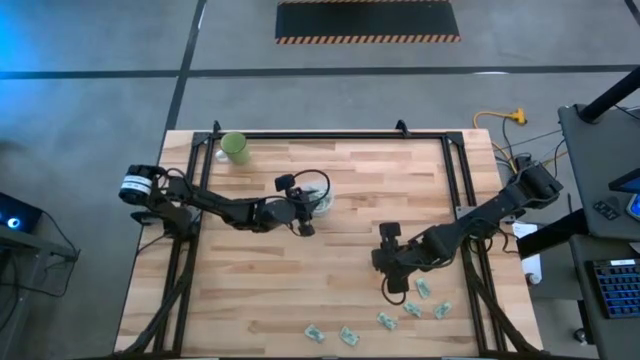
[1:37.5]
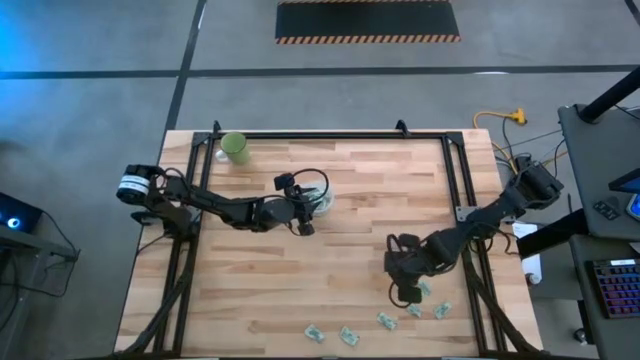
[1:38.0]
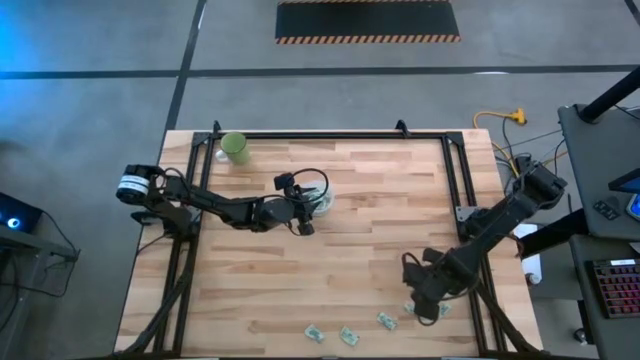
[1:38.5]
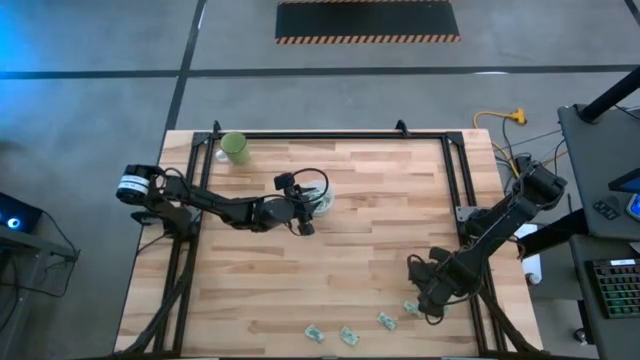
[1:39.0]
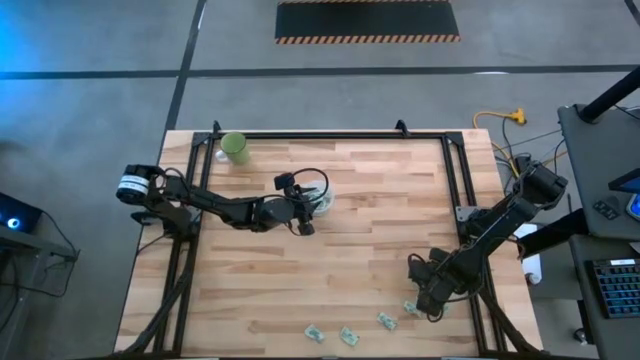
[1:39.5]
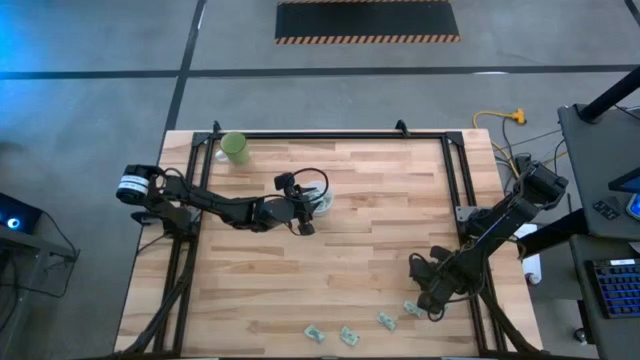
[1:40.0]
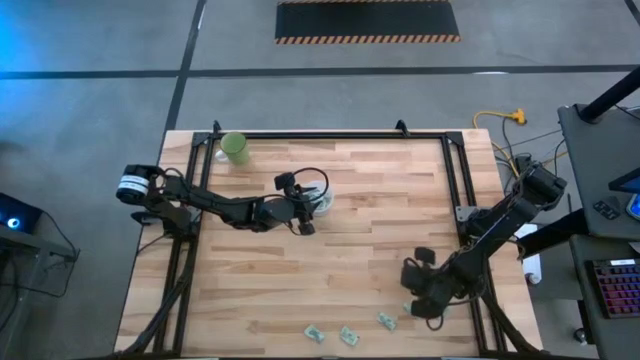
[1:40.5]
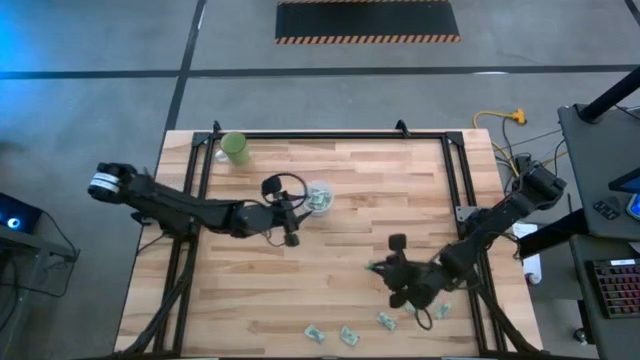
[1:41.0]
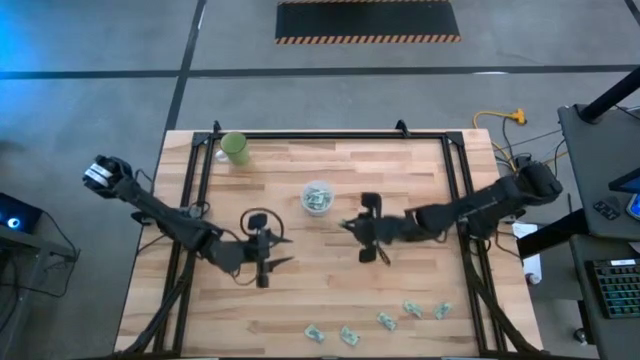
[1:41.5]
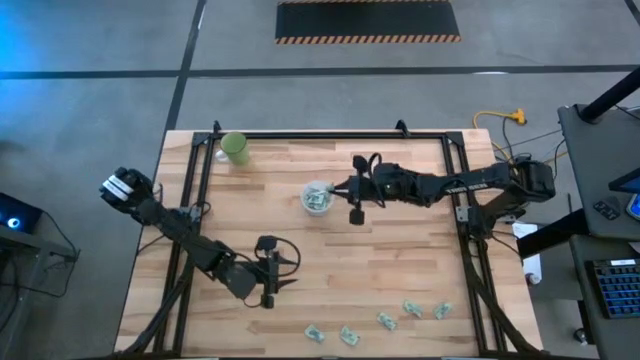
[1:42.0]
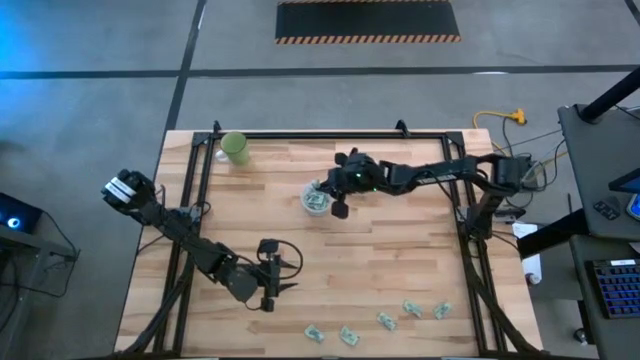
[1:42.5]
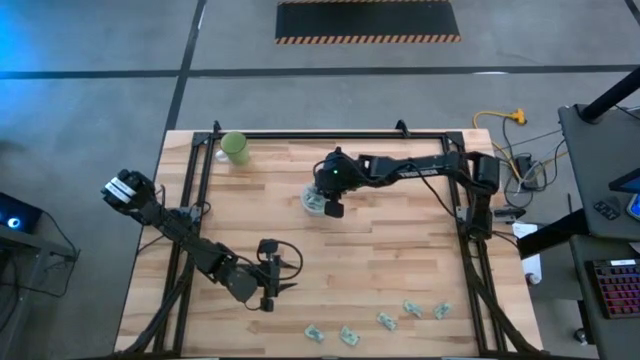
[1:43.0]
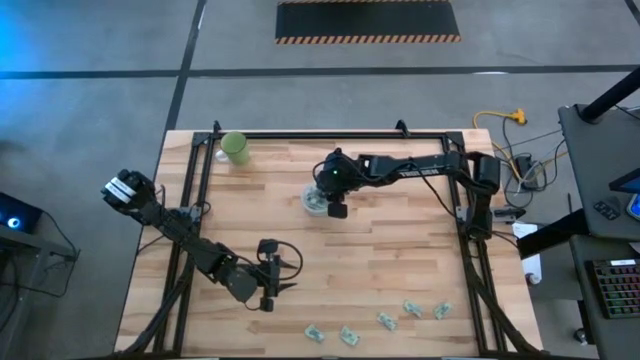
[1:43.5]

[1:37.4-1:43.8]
Task: Pick and place Stevia / Truvia into bins
Put the green stevia packet into the transparent container

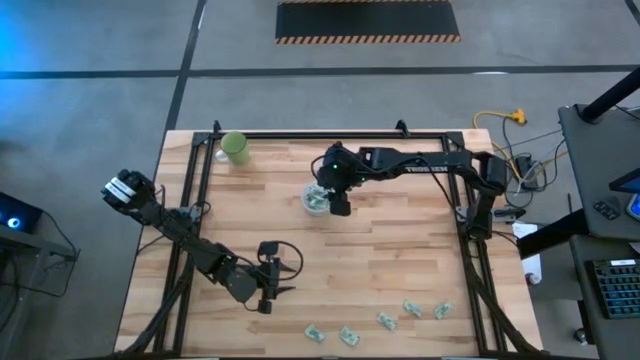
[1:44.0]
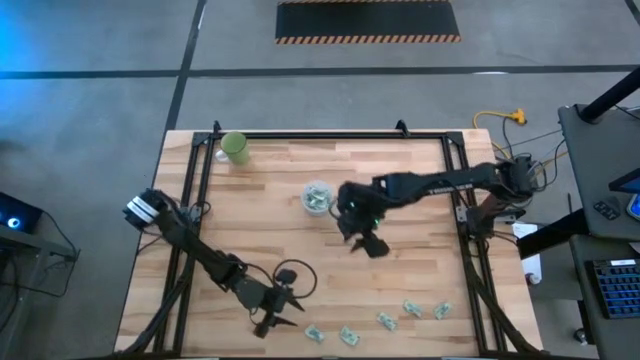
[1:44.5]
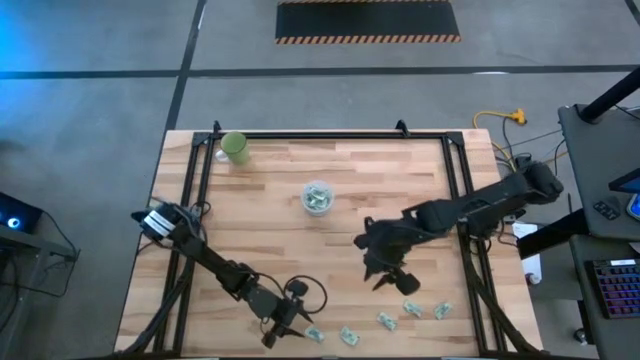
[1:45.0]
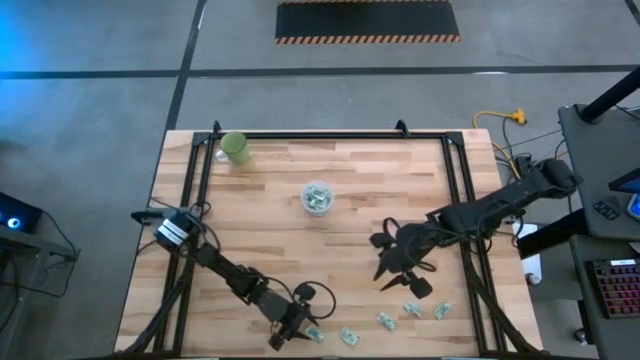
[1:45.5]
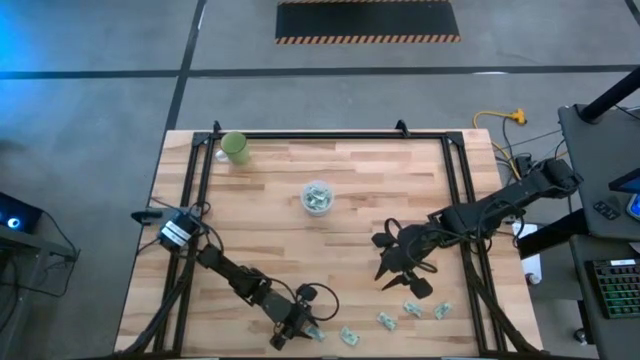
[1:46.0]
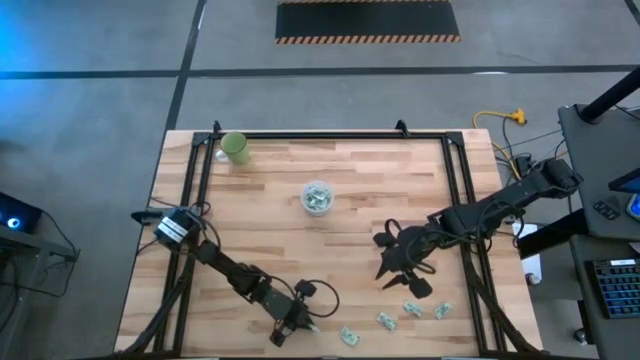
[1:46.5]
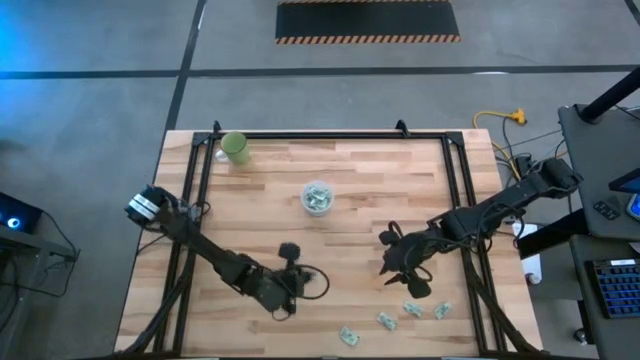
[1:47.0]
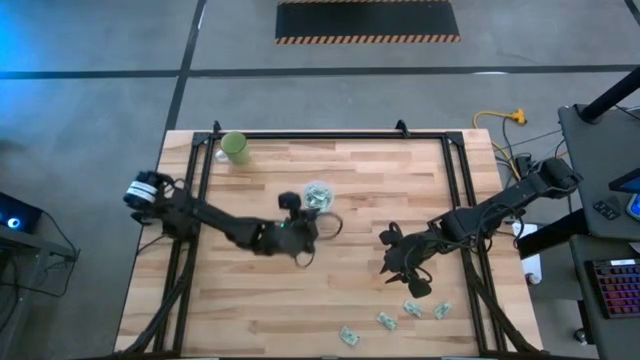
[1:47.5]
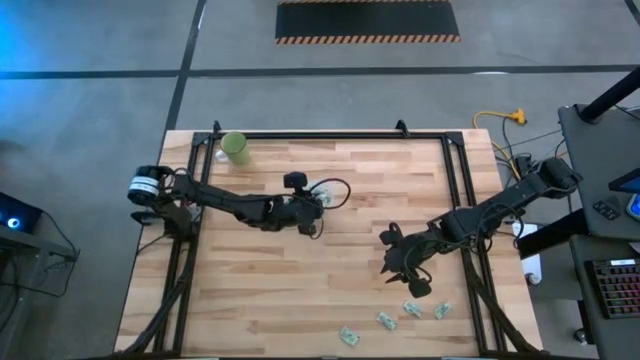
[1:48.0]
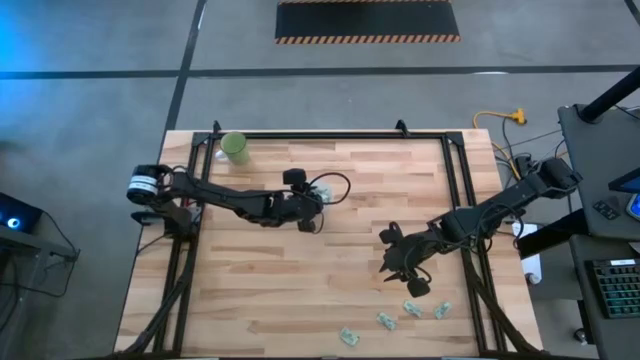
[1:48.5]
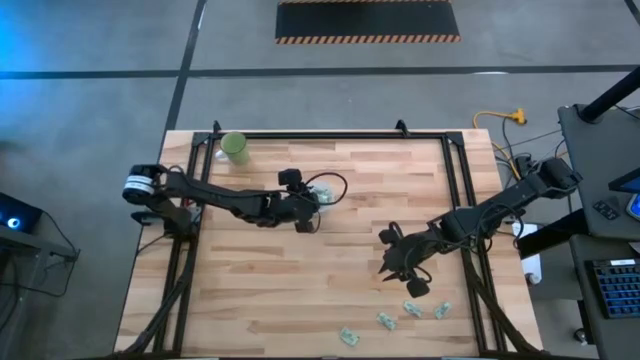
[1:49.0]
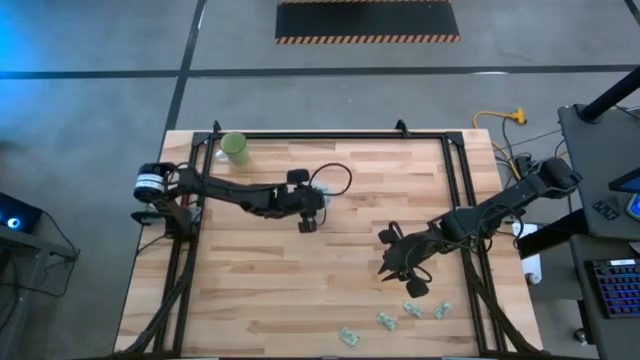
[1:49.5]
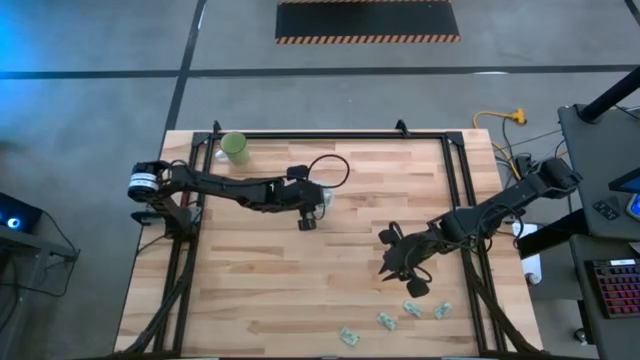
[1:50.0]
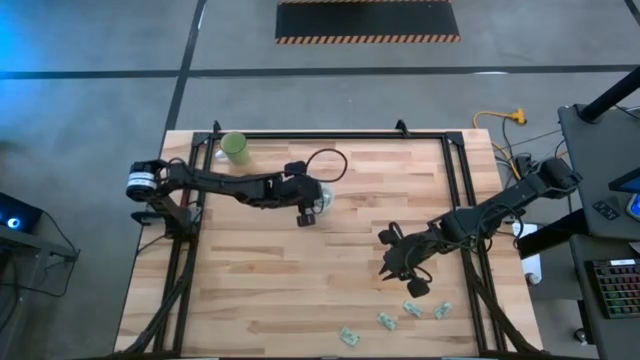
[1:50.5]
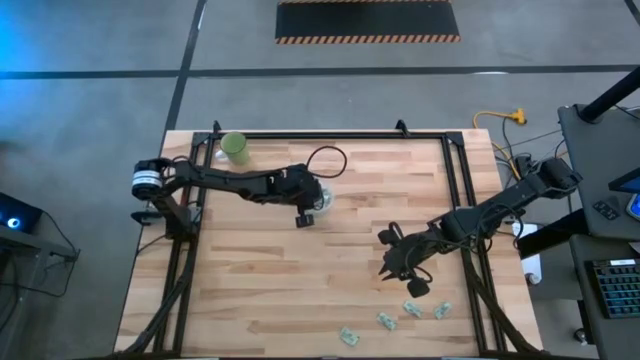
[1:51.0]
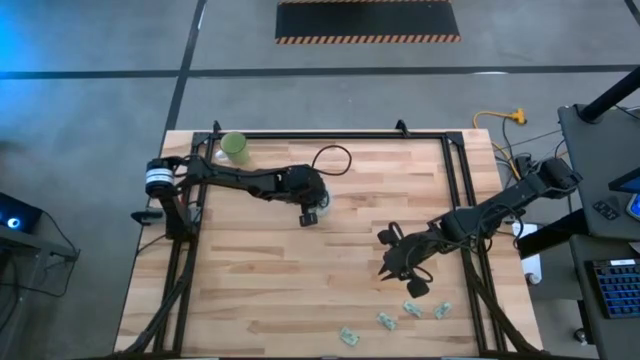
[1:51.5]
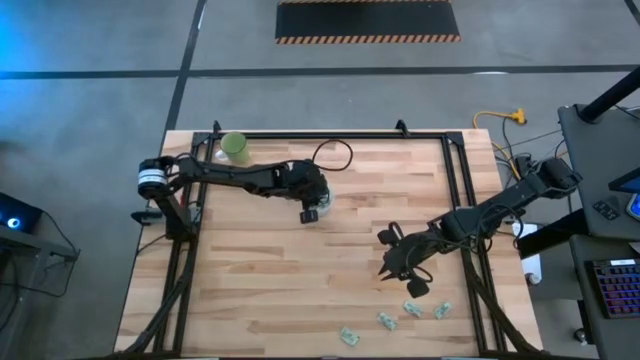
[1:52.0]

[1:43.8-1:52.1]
Put the green stevia packet into the transparent container

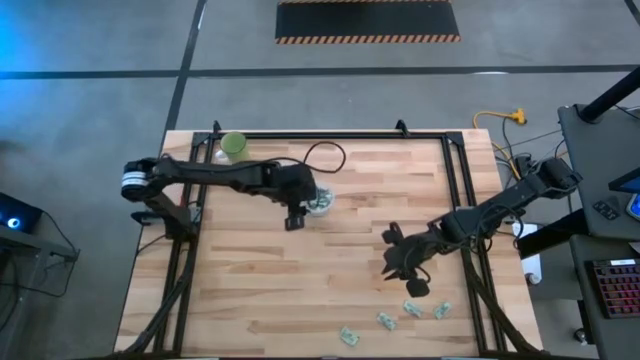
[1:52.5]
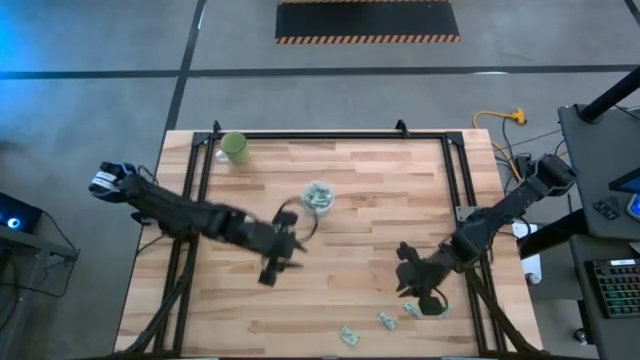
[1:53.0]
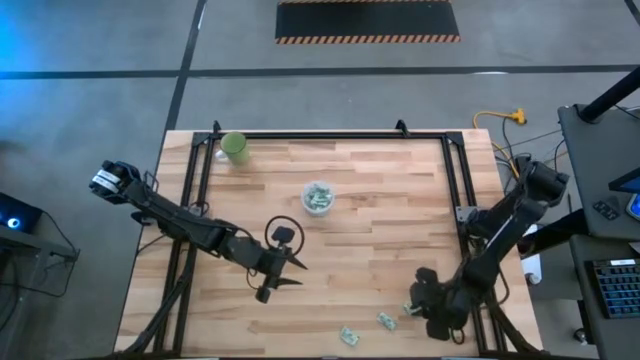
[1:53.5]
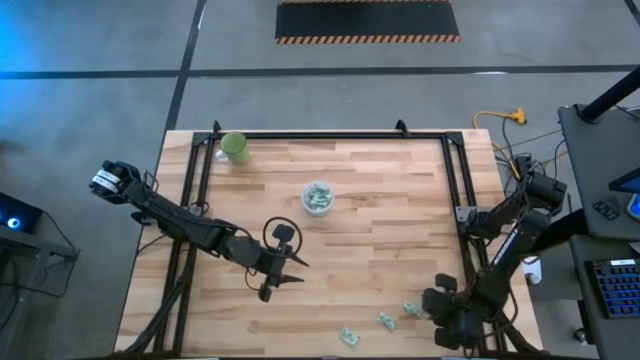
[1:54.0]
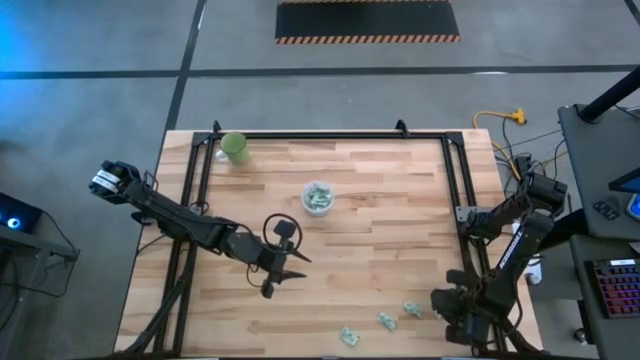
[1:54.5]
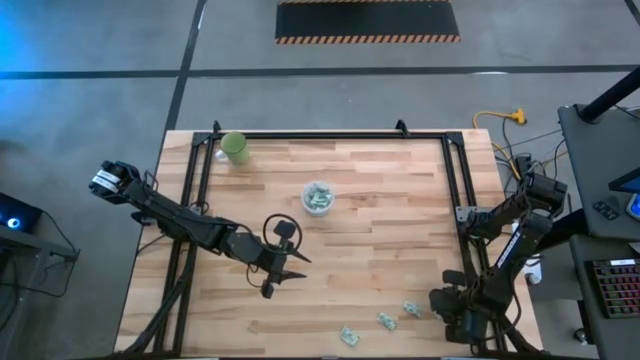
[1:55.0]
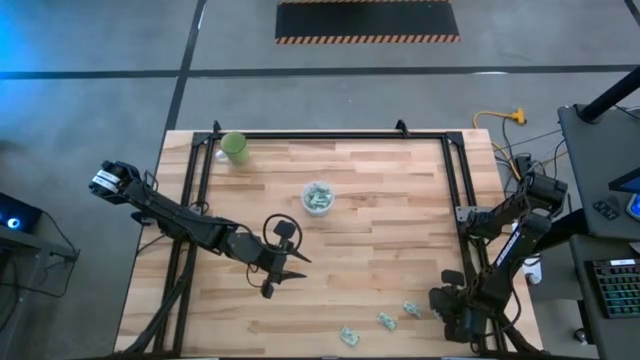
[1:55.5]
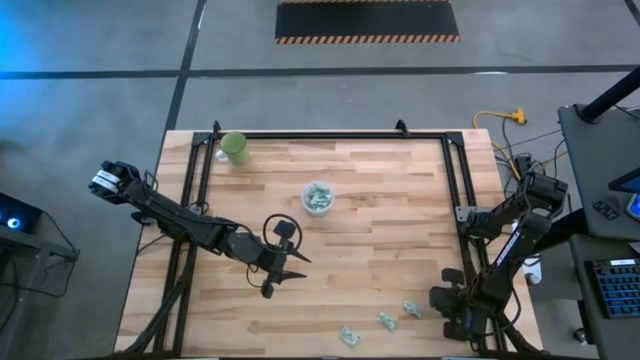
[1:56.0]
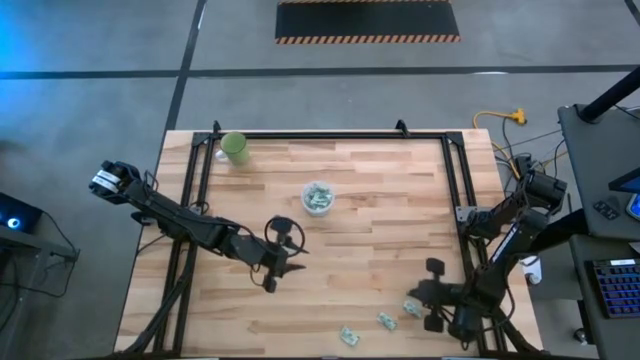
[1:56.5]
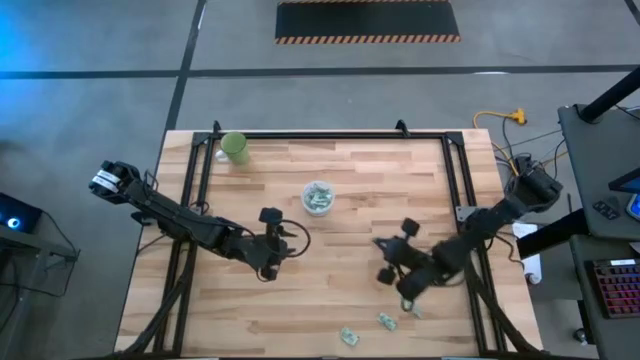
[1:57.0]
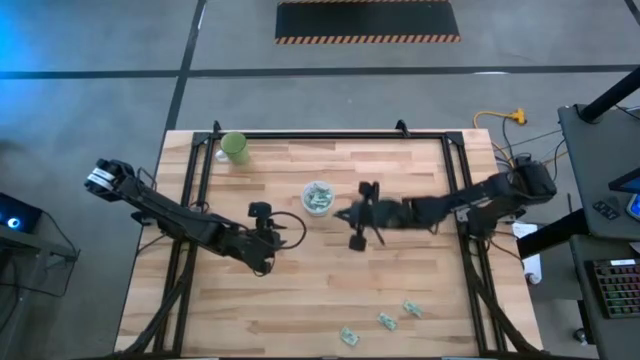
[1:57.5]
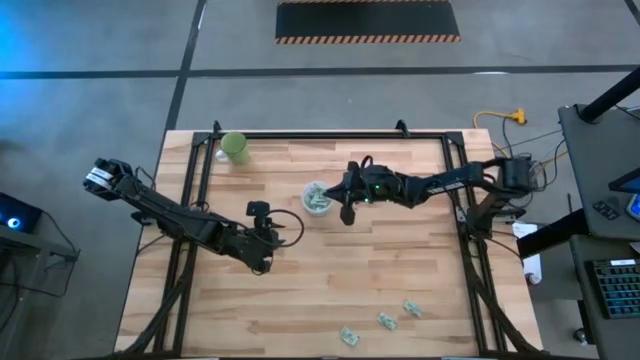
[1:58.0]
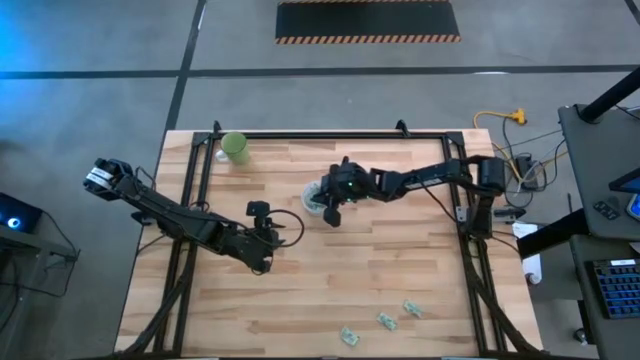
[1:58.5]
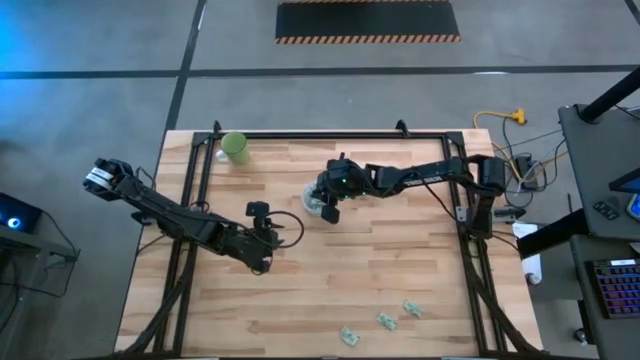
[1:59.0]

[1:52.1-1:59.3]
Put the green stevia packet into the transparent container
